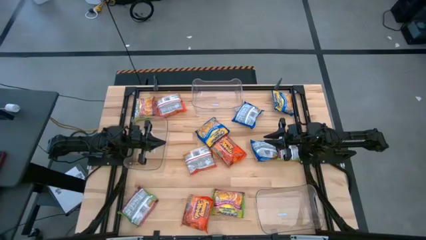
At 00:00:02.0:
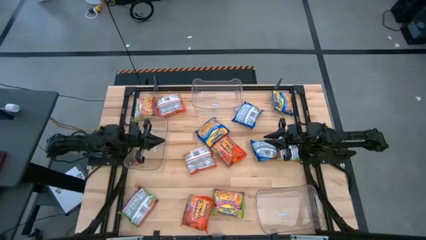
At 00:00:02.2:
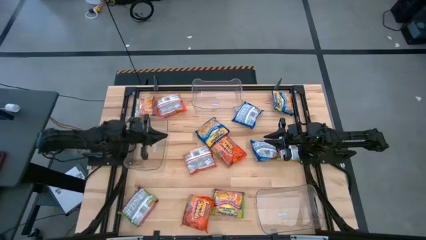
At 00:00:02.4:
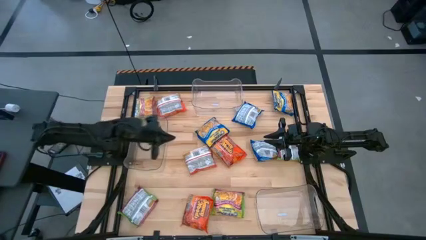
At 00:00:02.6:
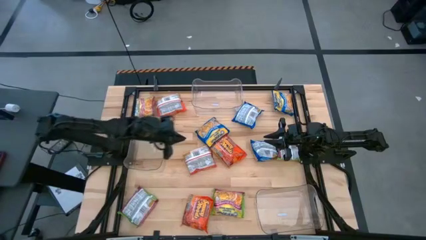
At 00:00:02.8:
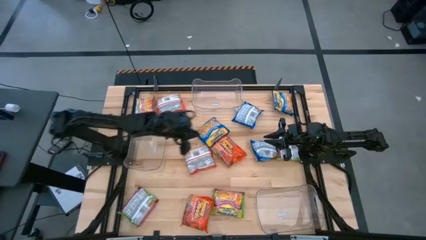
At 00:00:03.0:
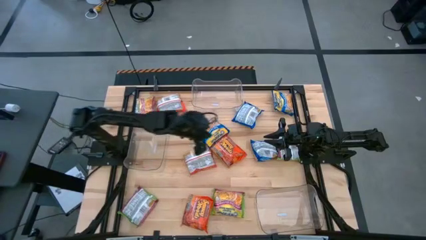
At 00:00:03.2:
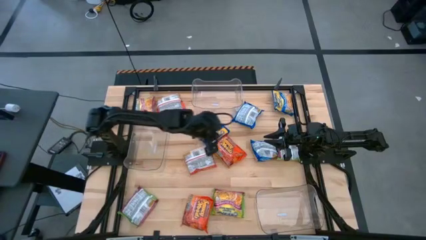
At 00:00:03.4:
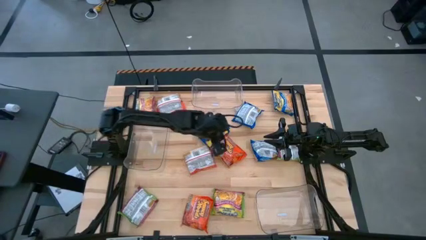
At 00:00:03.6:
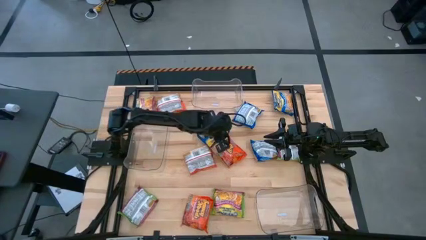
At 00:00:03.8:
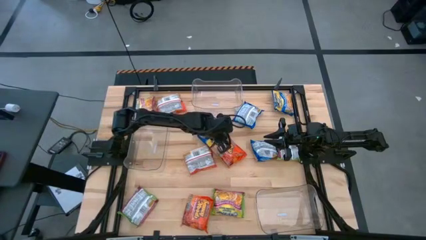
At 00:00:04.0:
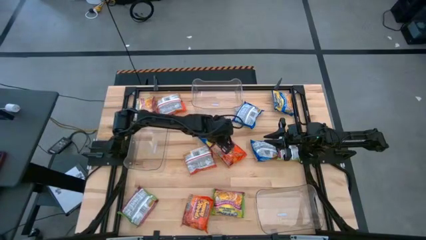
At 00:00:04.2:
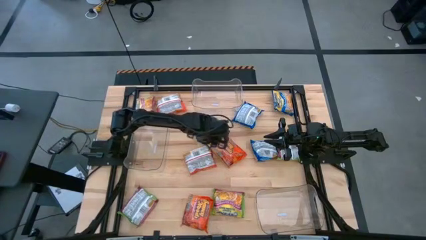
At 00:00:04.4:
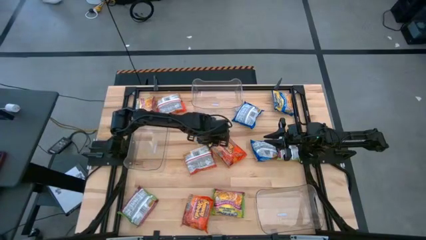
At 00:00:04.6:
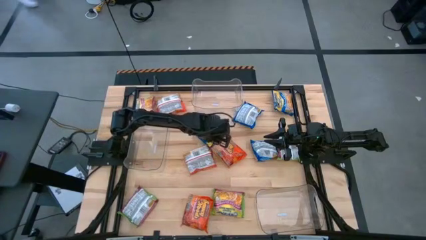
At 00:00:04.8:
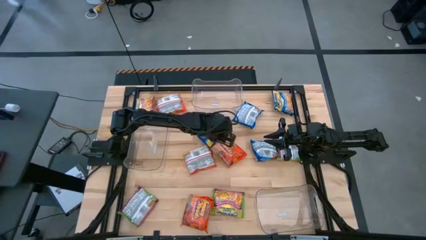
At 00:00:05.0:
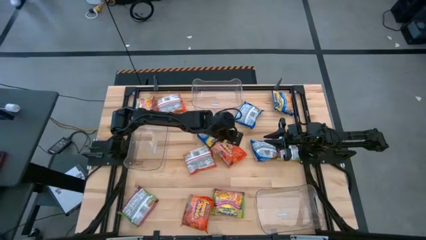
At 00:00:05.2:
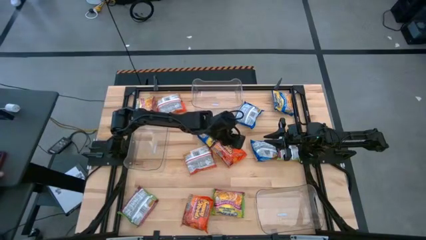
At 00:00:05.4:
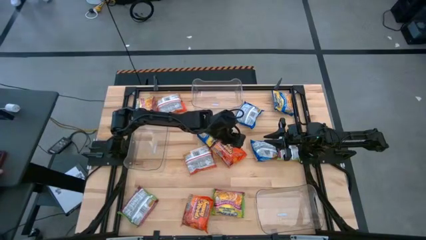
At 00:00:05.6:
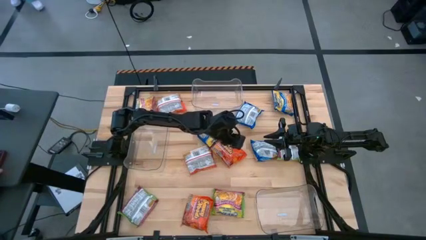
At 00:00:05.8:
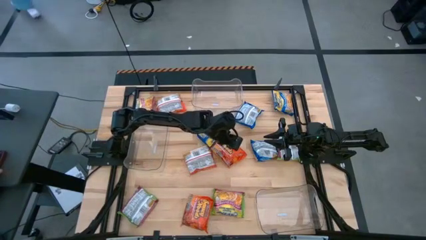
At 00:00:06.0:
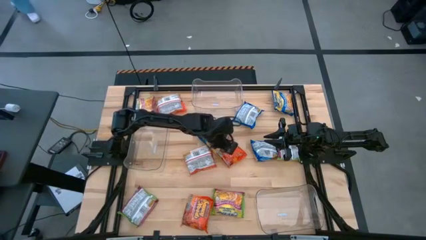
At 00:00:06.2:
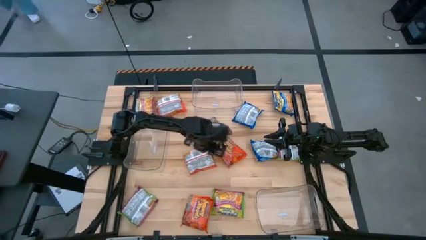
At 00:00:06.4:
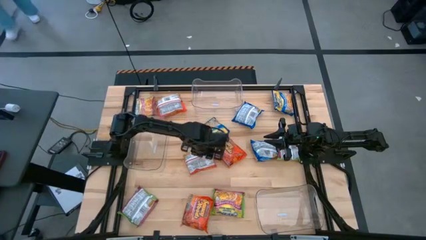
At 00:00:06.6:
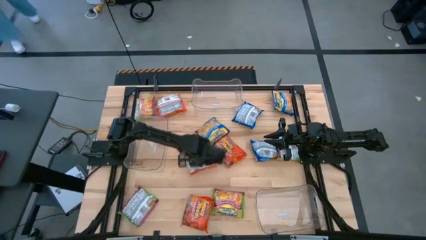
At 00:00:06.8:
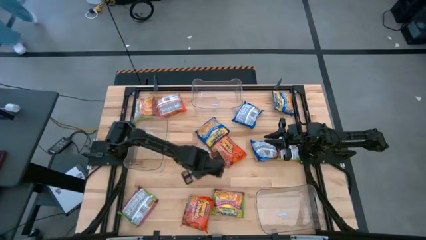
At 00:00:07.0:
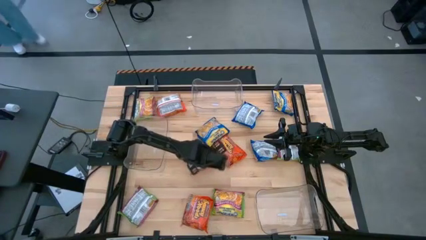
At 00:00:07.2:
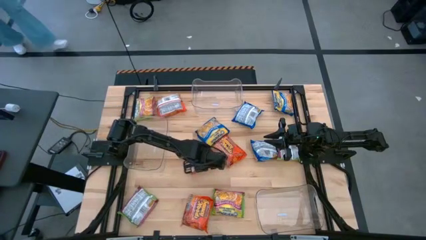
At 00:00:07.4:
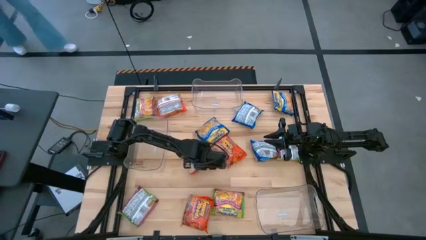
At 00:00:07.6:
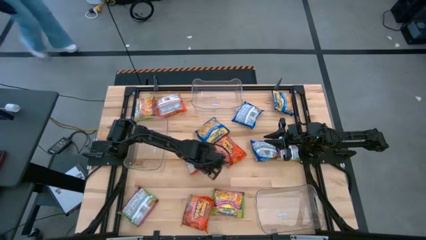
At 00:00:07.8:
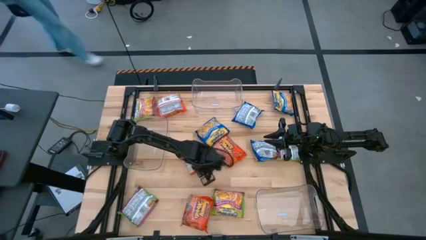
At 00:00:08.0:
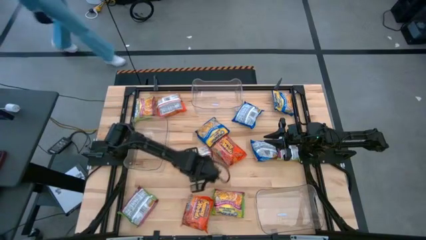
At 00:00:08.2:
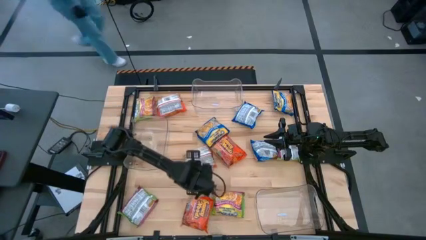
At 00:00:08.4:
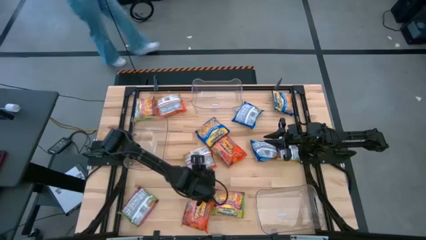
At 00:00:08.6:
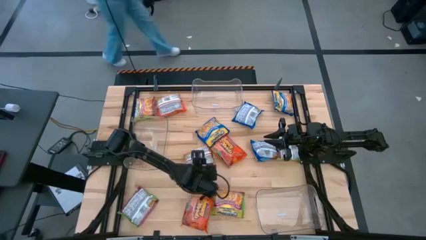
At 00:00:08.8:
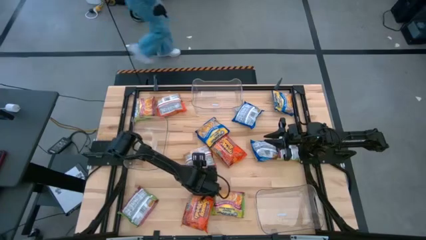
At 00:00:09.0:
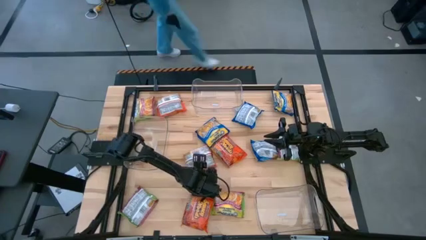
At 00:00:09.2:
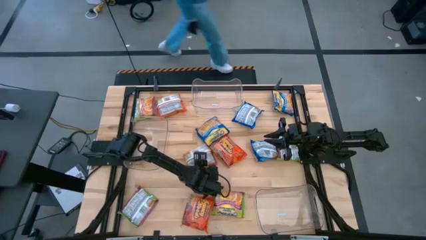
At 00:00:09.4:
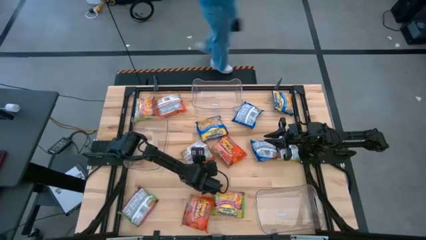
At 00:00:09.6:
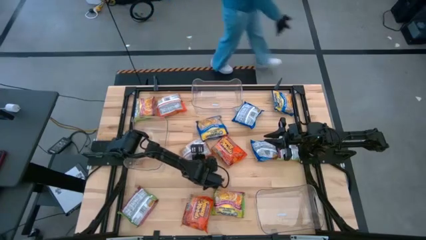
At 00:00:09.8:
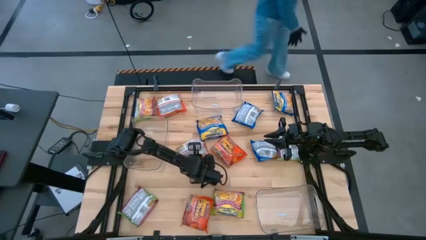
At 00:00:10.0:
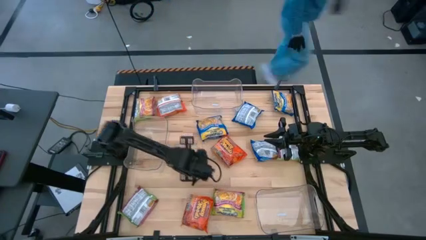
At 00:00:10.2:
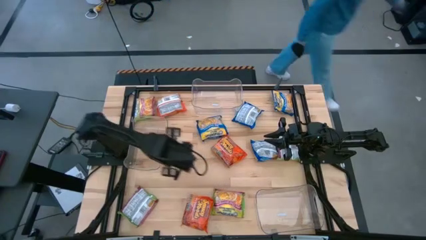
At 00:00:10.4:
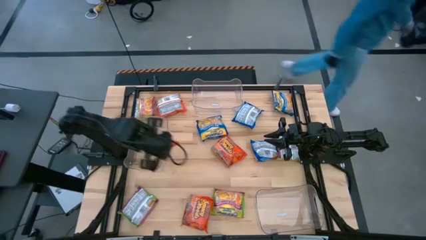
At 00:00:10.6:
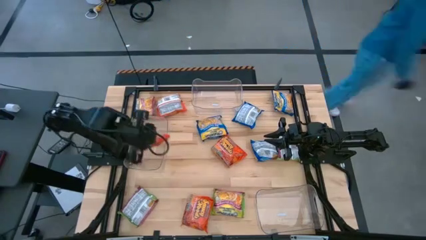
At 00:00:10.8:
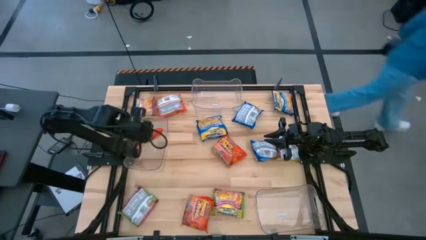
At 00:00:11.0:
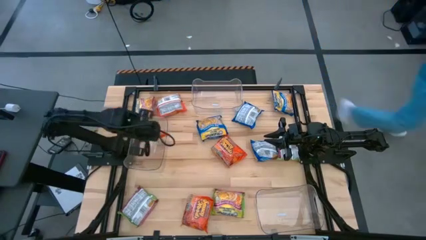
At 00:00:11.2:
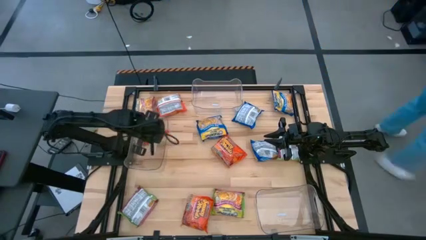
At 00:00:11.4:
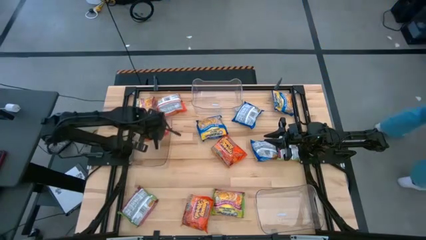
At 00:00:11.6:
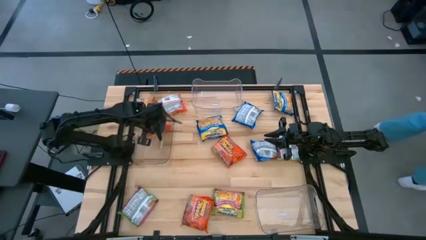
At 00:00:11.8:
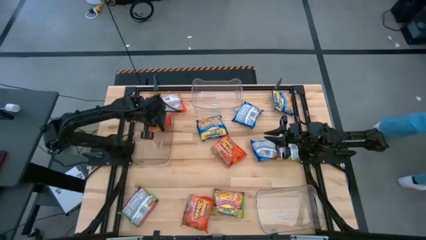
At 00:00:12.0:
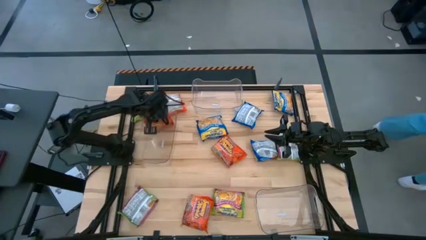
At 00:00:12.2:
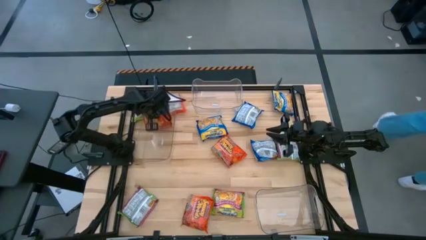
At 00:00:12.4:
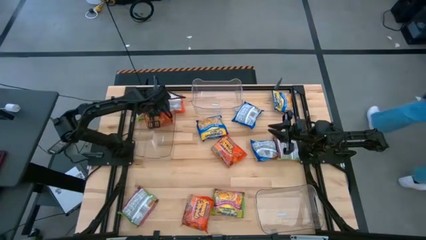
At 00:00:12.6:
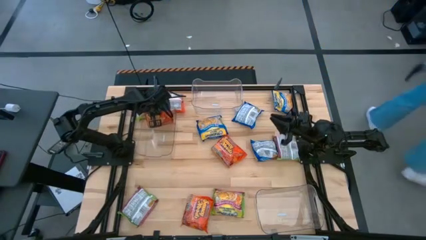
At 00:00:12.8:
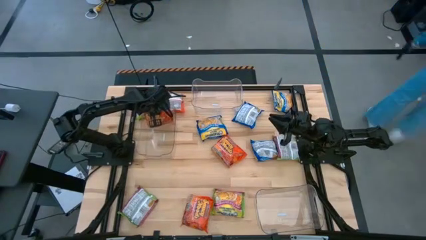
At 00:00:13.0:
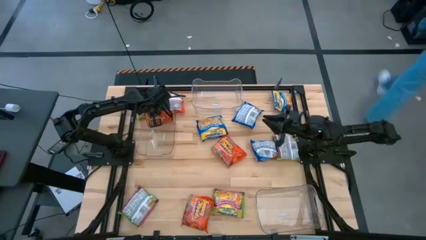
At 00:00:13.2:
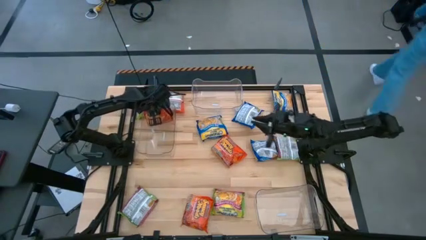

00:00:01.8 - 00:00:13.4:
Task: Sort Maruchan noodles
Put the orange noodles into the left transparent bin

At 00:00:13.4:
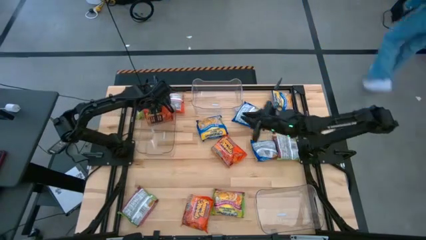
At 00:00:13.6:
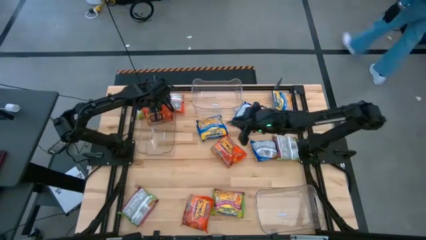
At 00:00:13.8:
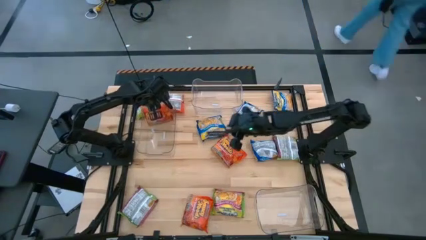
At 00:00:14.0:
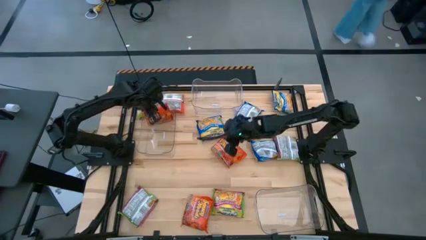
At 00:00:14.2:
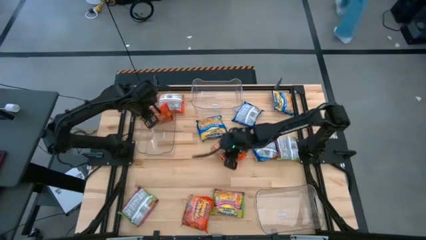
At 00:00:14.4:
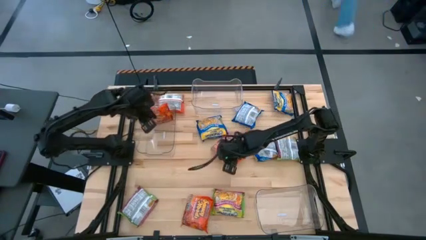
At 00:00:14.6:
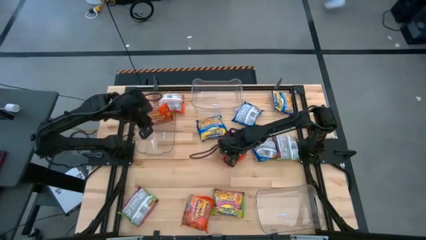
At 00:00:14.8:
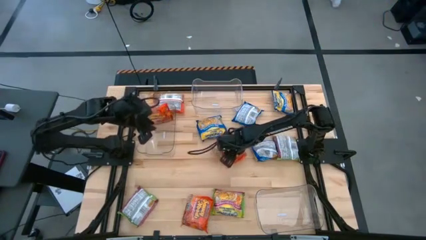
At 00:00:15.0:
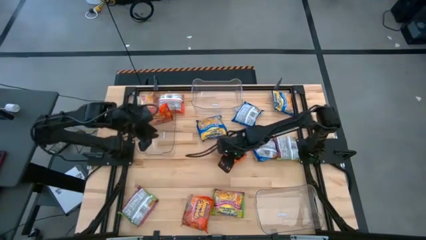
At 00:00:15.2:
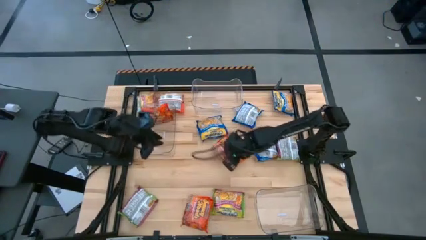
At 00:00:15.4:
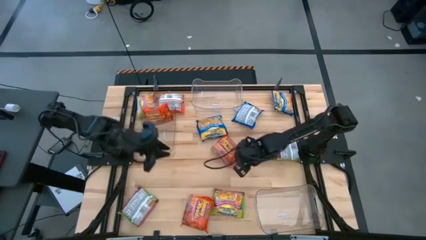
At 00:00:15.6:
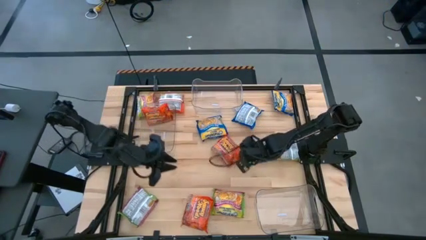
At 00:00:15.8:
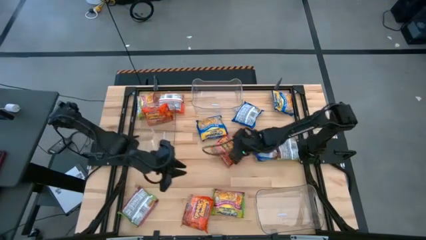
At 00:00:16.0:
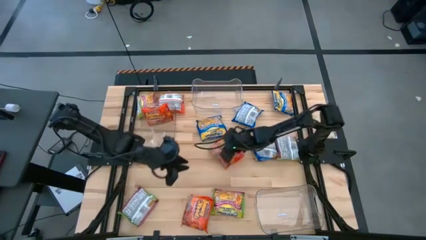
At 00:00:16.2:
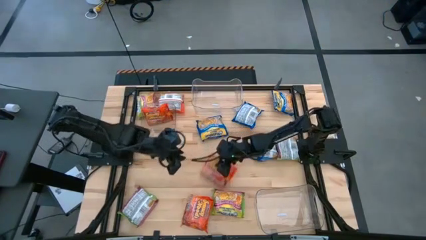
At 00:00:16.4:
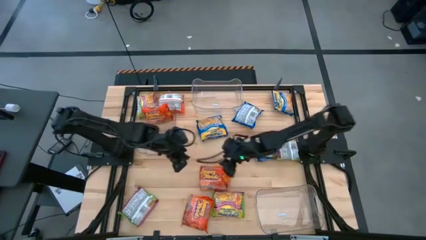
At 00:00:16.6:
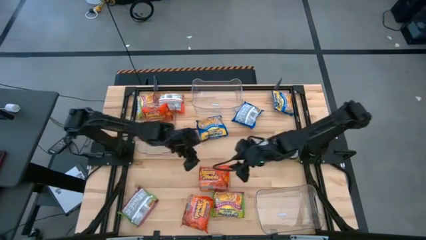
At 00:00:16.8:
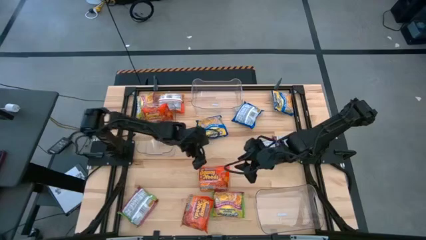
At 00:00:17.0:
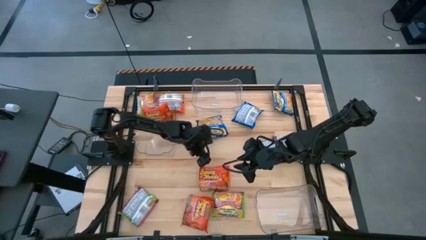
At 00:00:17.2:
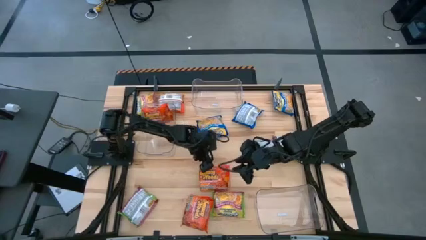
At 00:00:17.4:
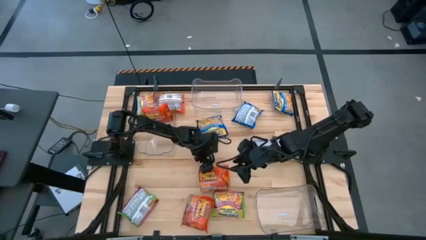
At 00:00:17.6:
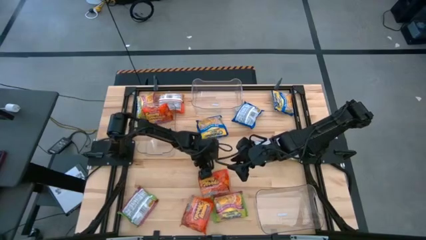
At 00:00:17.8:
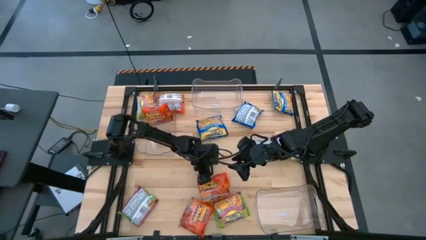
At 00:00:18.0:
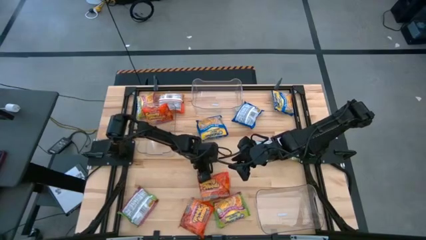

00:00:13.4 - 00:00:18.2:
Put the orange noodles into the left transparent bin
